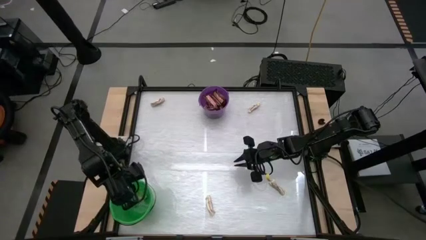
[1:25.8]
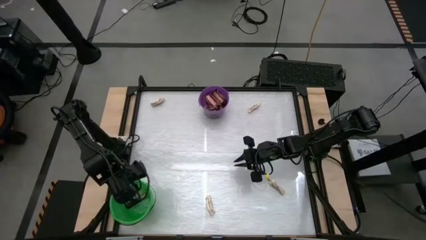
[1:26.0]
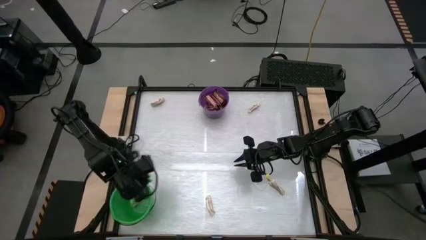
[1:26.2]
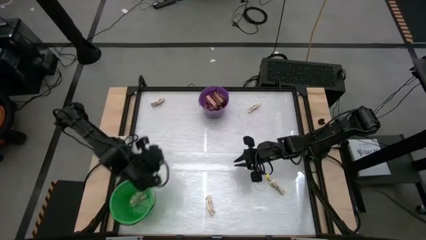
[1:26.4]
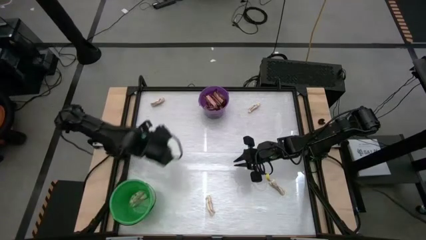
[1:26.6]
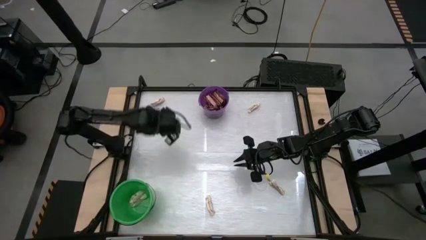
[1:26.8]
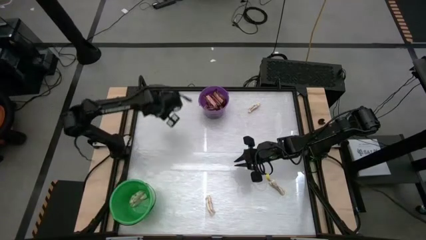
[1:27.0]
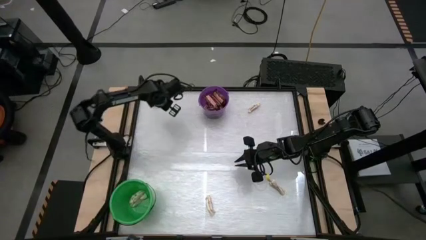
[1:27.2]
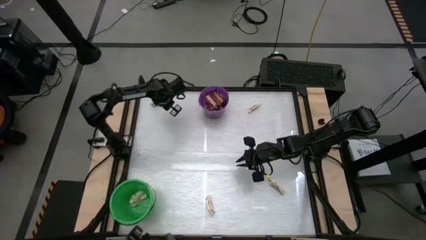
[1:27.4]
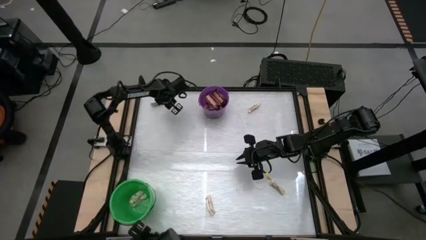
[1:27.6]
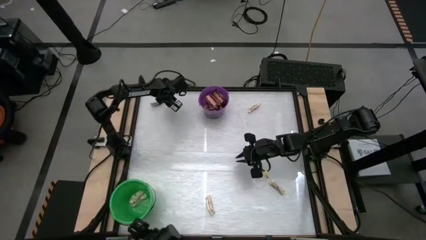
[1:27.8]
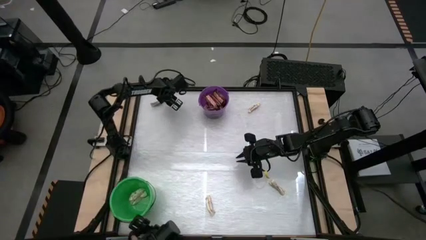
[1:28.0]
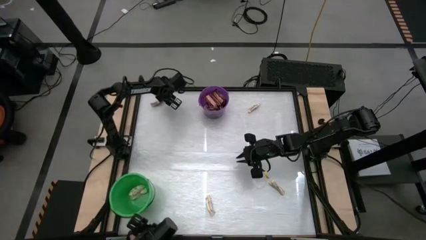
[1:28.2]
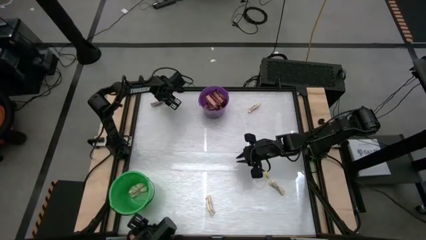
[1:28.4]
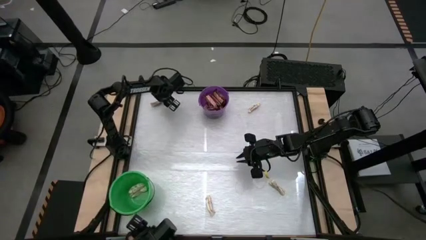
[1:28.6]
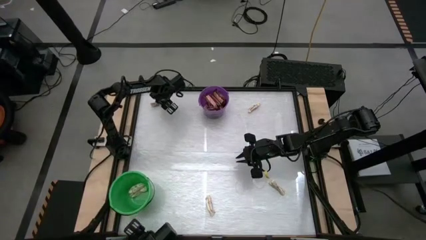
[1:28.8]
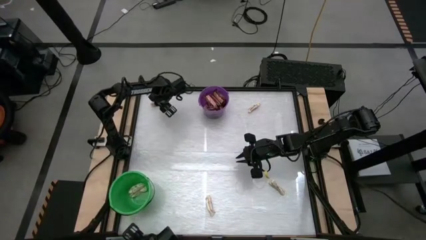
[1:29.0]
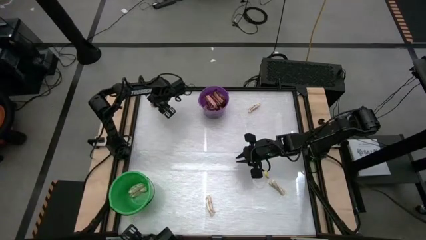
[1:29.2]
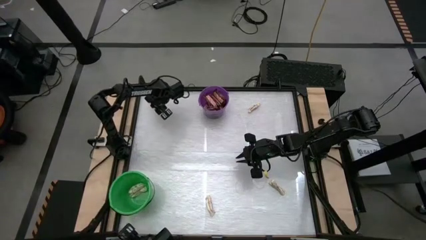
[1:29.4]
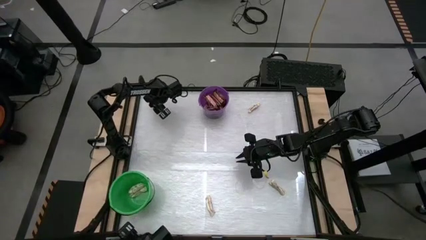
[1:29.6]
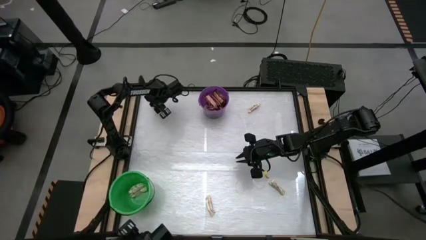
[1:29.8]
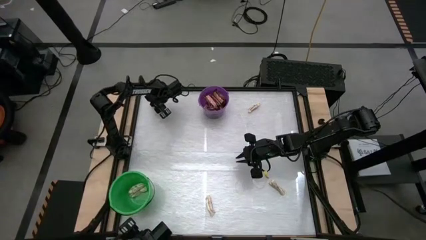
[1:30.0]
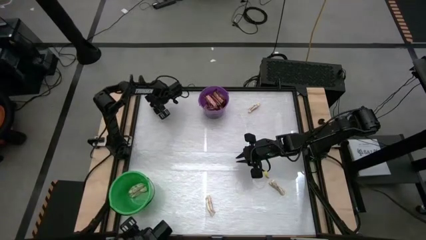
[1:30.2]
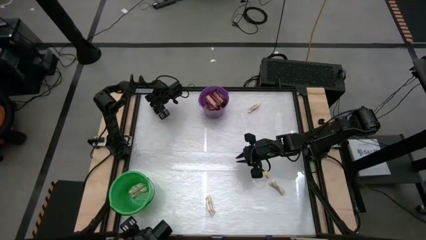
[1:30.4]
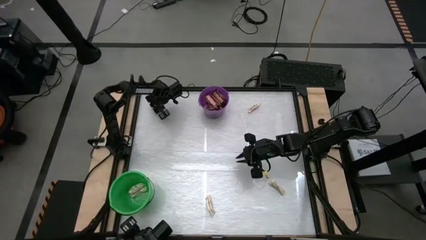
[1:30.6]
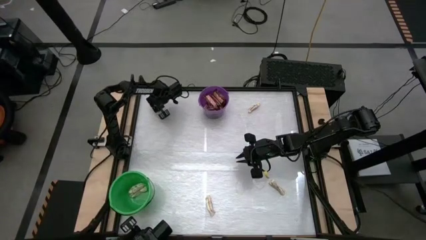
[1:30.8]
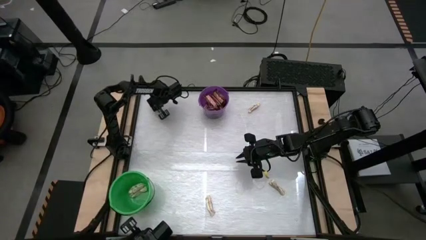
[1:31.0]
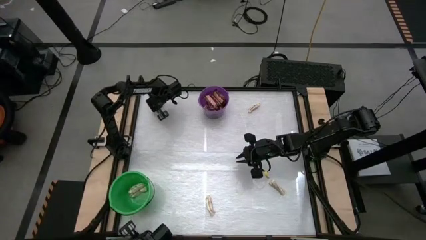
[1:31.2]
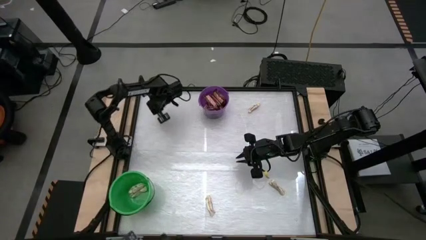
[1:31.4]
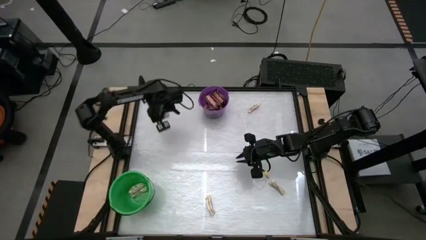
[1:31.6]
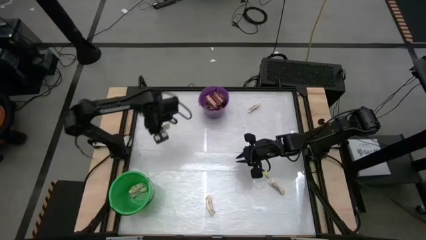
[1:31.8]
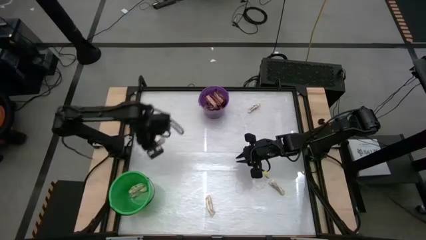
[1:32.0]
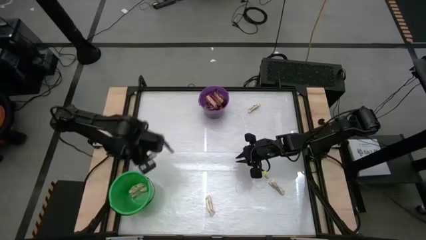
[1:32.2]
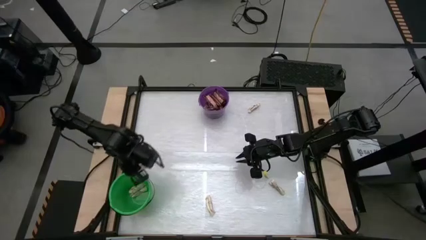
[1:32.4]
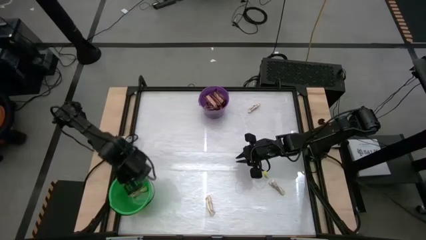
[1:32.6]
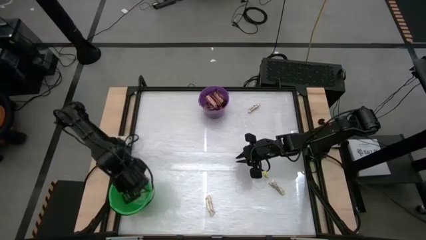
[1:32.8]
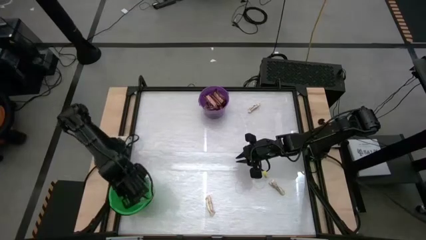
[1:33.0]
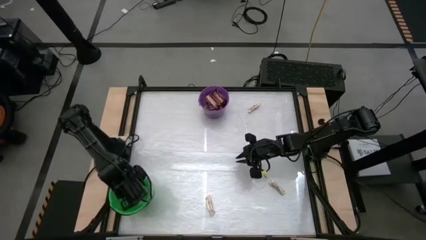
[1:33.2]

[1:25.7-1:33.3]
Task: Sort candy by brand, put in halloween buckets
Put the white chocolate into the green bucket

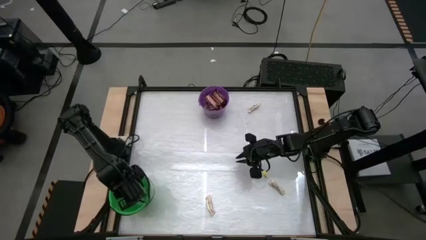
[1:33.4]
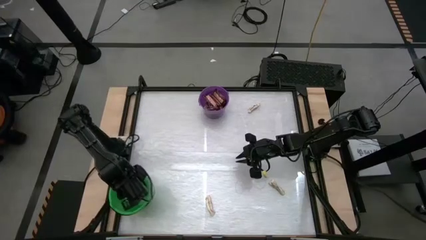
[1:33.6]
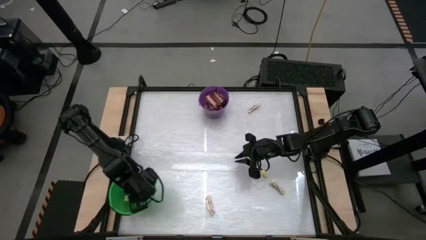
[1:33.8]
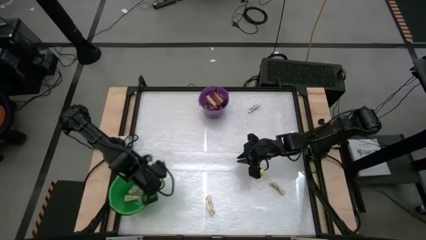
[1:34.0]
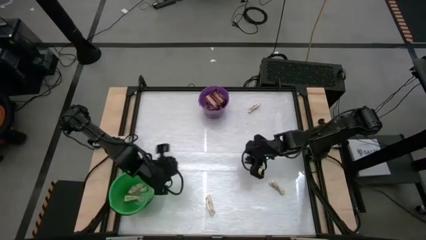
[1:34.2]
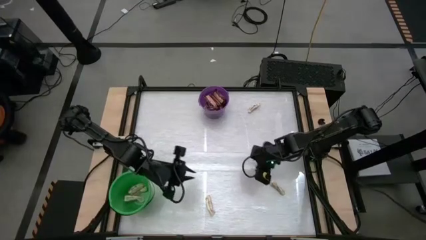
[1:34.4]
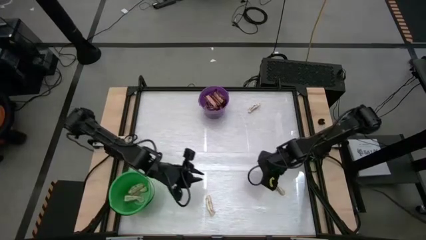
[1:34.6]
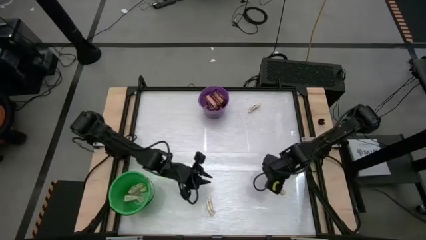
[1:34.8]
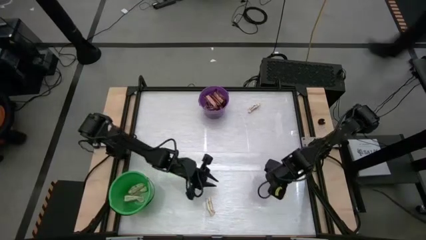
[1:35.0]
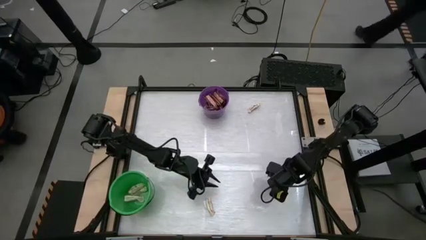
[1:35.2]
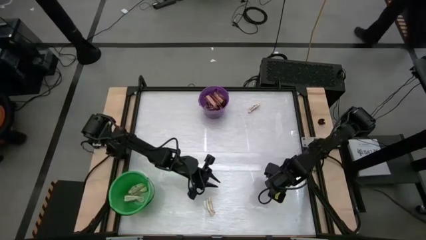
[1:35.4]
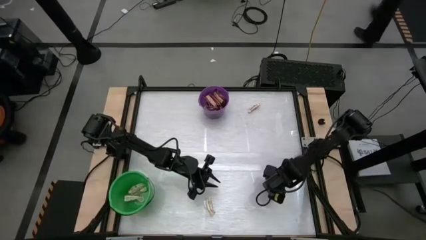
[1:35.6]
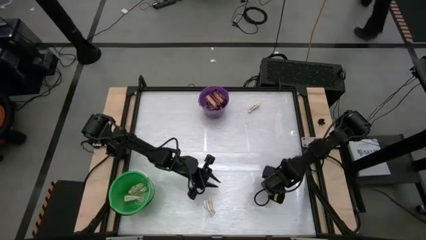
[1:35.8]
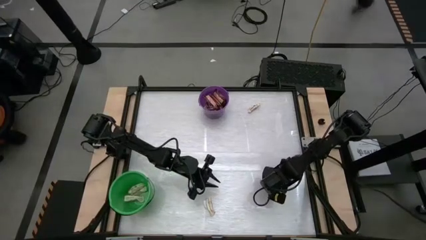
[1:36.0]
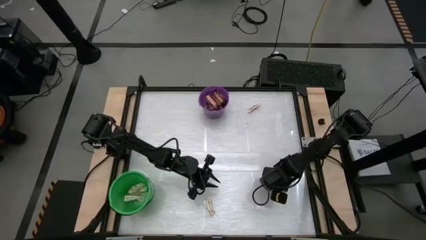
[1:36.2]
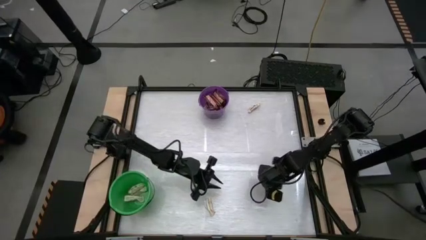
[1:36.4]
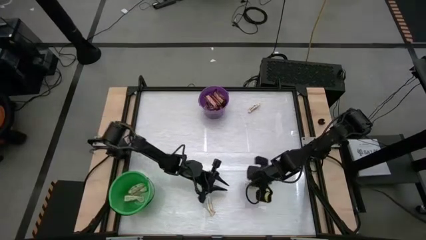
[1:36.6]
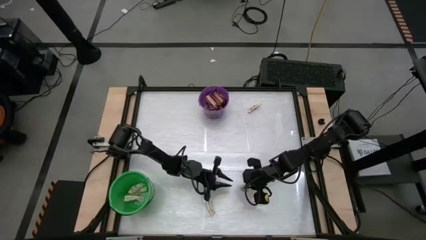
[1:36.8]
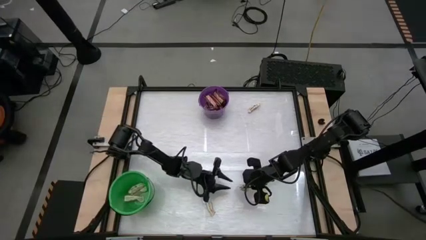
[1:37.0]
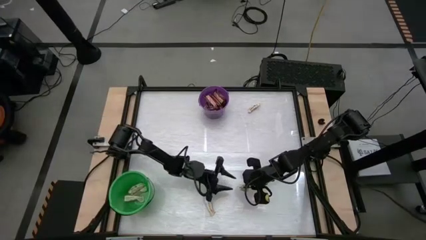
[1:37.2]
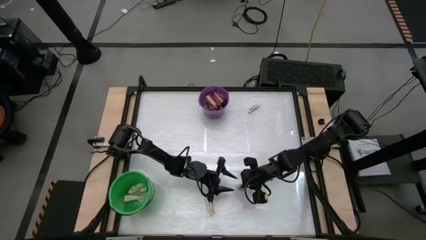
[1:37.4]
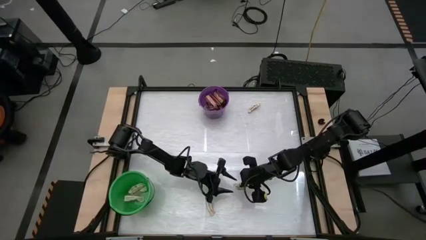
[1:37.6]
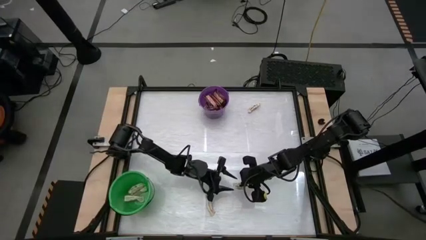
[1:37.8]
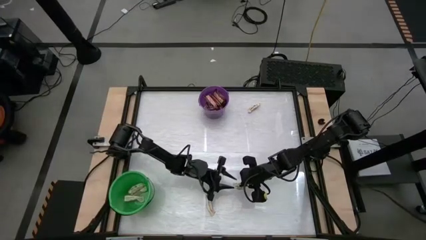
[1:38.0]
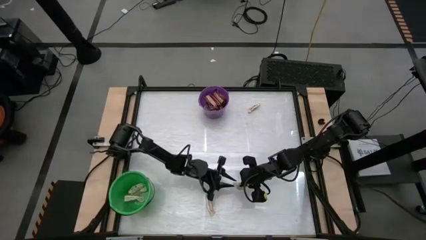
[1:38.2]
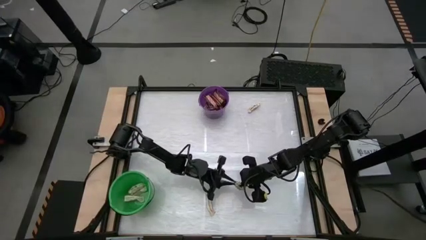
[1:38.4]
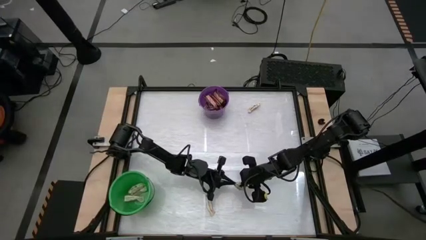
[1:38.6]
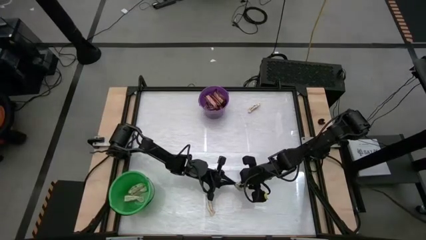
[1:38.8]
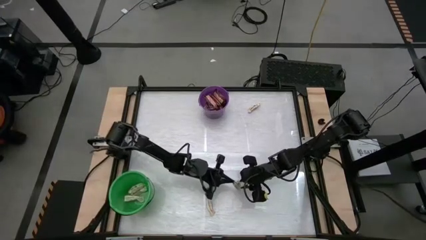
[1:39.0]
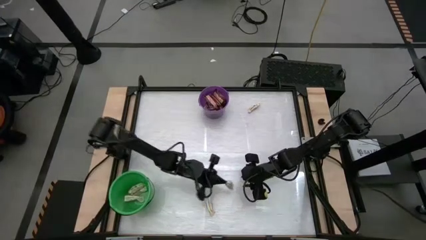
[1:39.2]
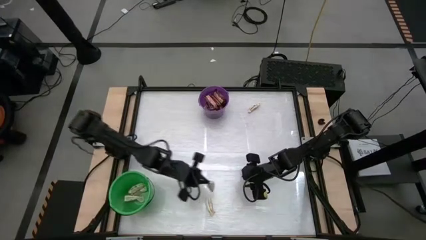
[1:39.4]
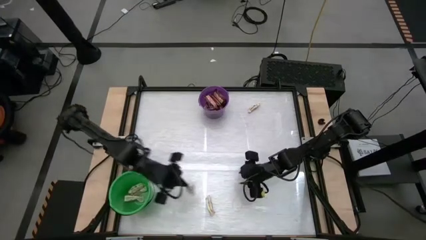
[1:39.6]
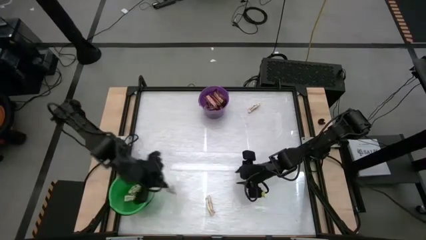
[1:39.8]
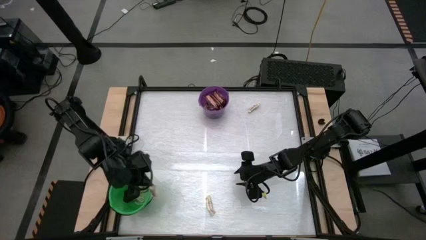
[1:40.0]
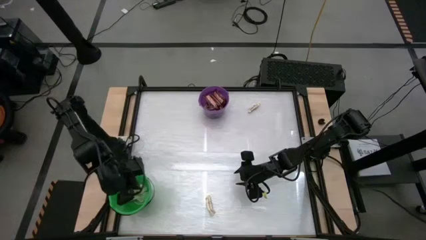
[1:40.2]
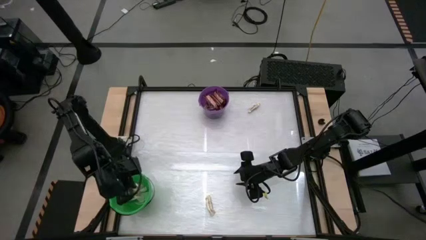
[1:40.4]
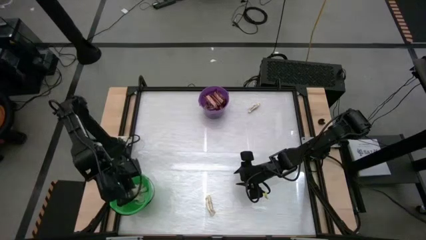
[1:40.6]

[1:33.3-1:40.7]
Put the white chocolate into the green bucket

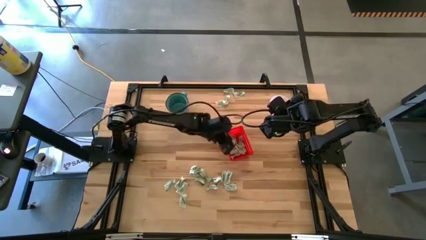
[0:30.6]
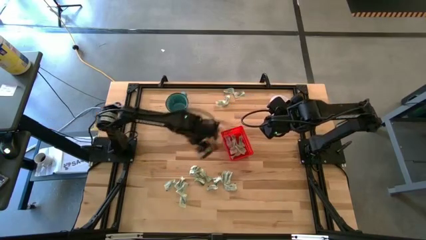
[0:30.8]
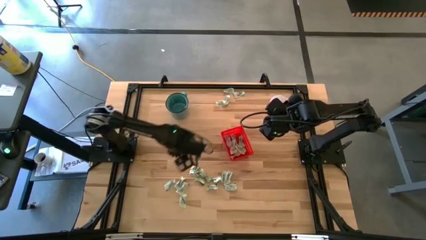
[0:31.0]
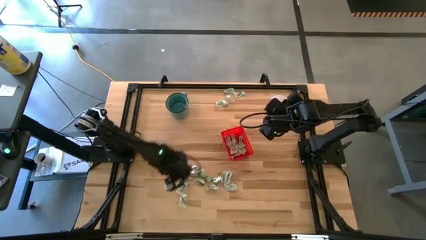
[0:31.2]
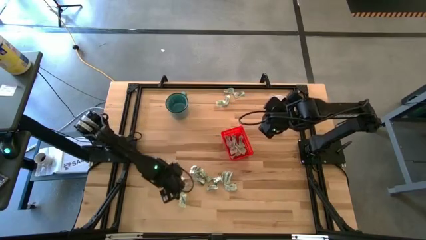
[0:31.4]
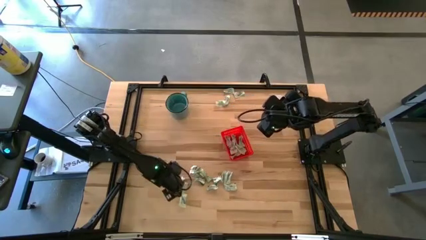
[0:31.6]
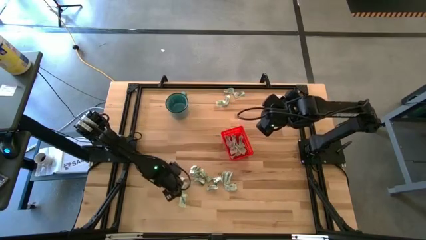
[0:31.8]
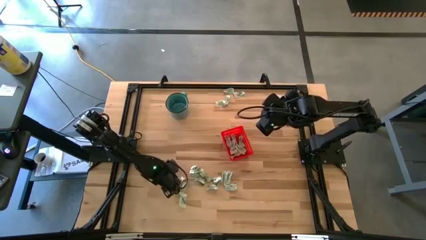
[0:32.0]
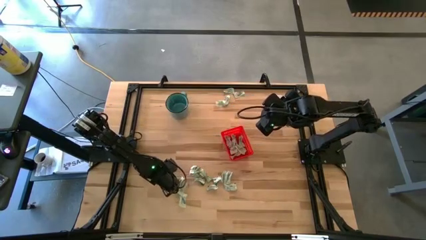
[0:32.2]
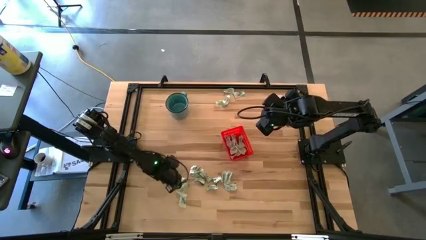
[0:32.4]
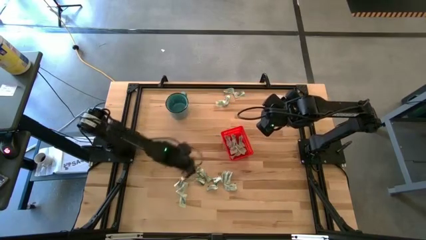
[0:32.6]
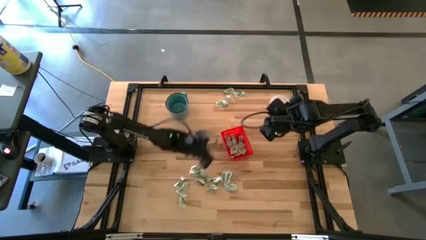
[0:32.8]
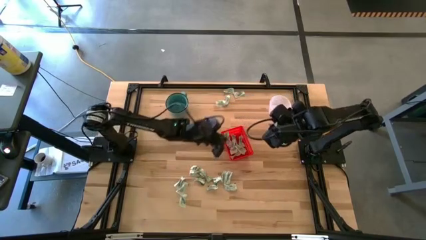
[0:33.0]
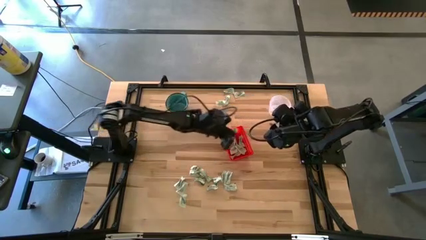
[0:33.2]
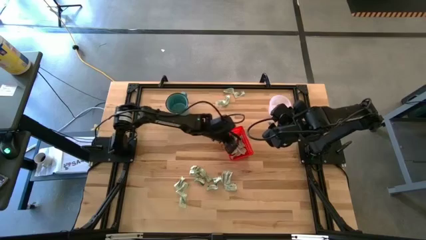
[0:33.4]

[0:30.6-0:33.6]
Task: Pick and place items into bin
Put the stevia packet into the orange bin
